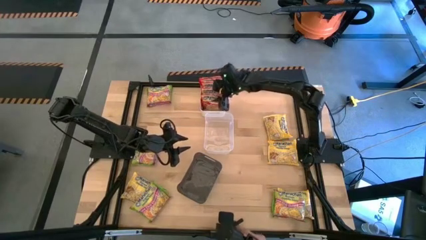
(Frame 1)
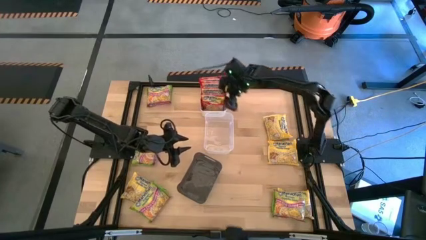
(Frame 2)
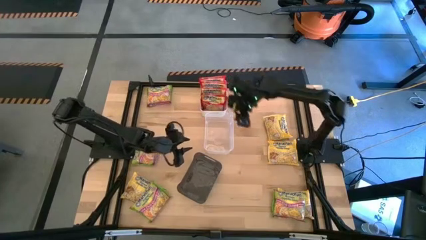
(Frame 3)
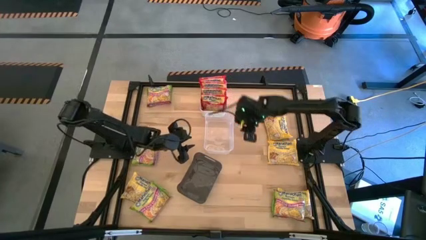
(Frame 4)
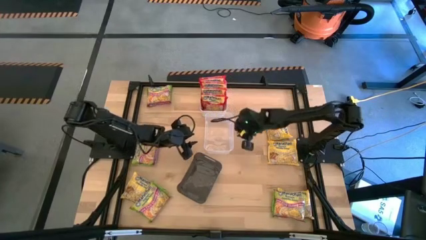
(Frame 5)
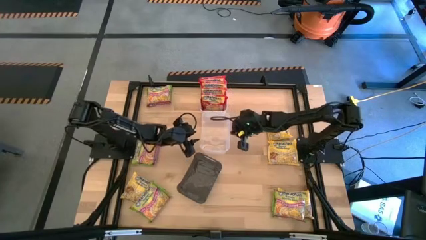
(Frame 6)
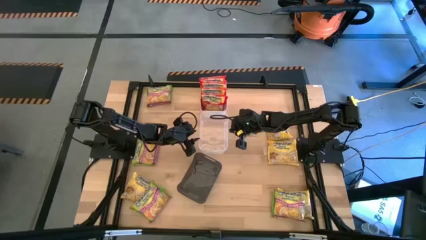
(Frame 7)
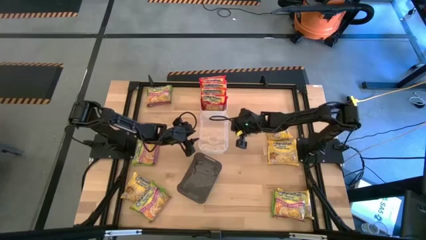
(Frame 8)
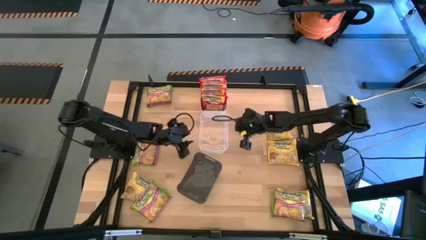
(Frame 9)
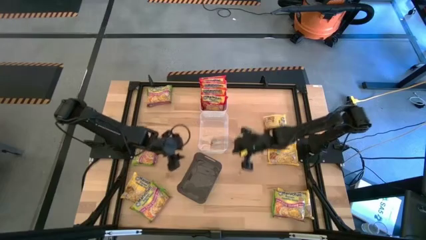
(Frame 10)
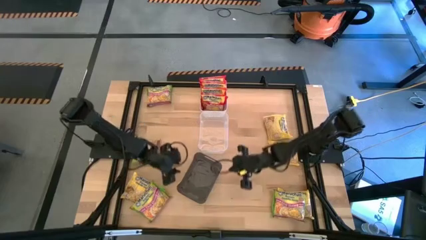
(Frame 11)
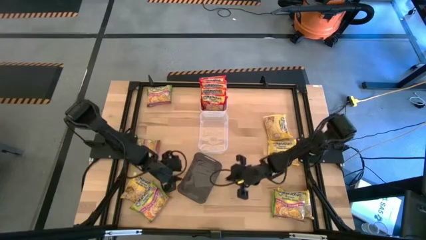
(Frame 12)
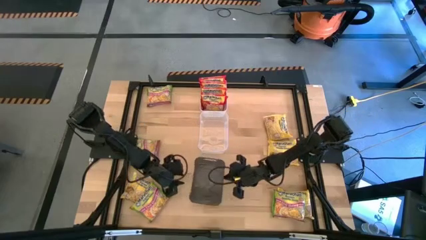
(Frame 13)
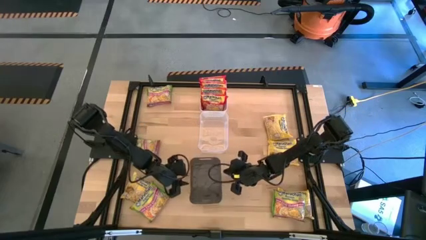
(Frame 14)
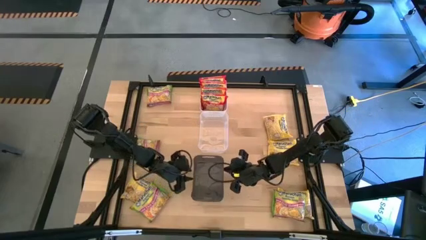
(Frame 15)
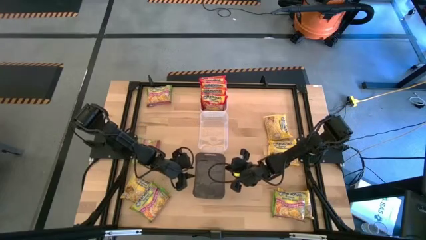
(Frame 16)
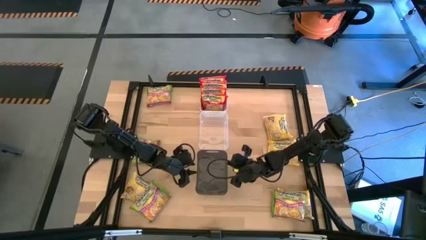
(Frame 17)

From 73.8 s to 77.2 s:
Task: Sort Maruchan noodles
Adjust the bins on the table

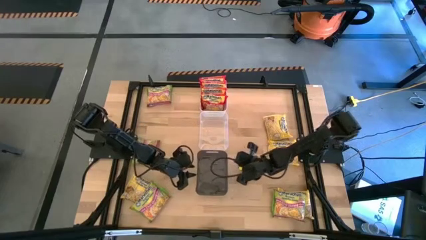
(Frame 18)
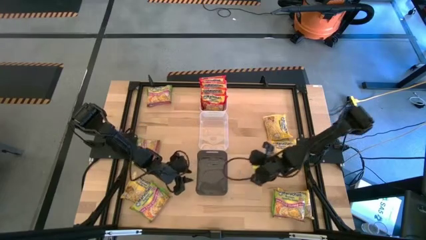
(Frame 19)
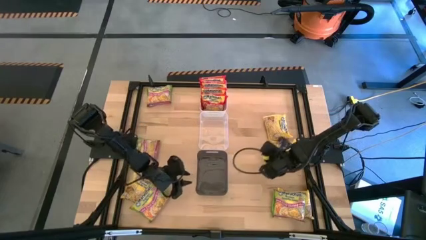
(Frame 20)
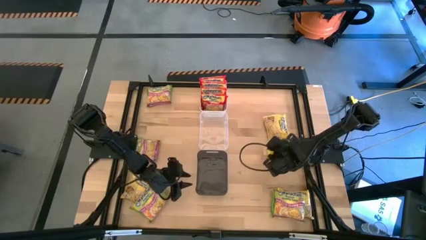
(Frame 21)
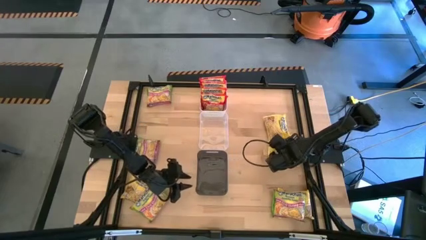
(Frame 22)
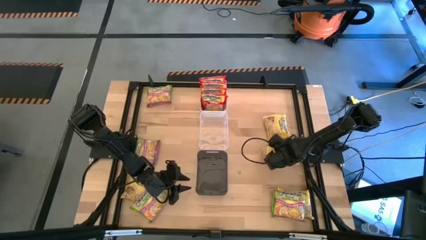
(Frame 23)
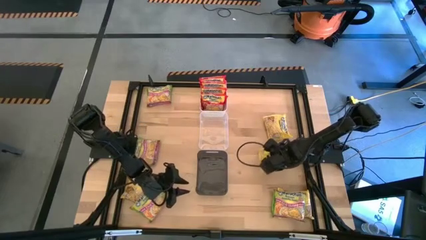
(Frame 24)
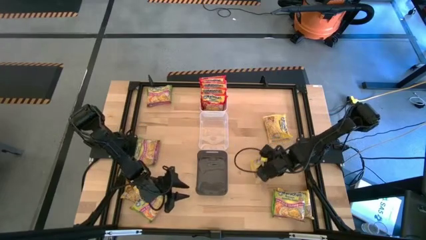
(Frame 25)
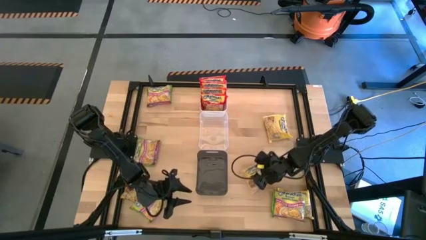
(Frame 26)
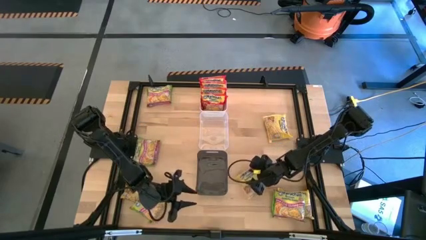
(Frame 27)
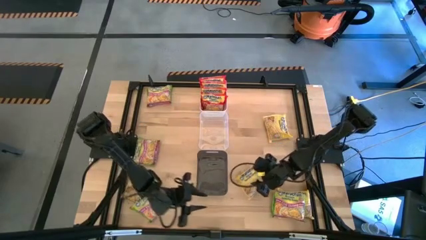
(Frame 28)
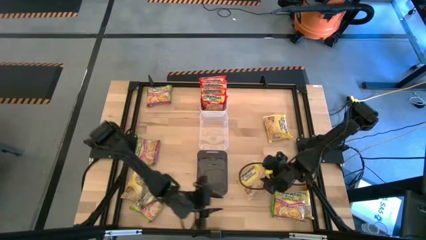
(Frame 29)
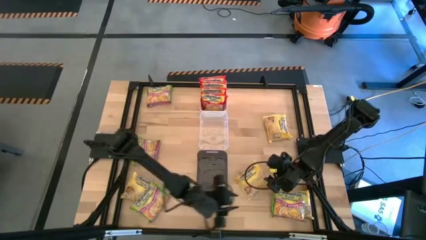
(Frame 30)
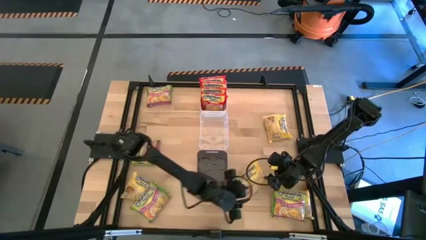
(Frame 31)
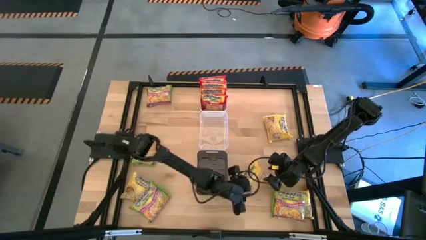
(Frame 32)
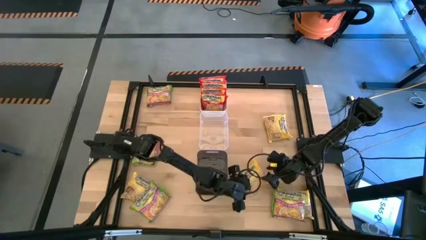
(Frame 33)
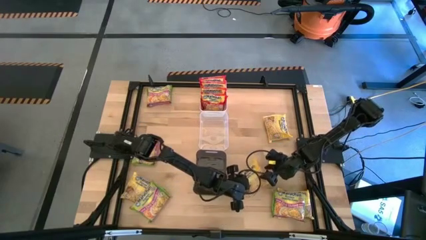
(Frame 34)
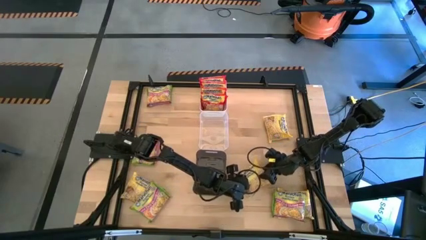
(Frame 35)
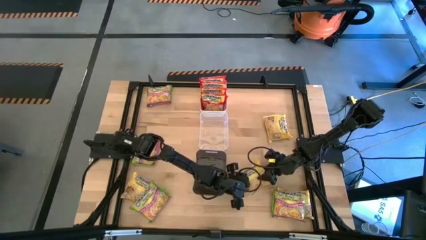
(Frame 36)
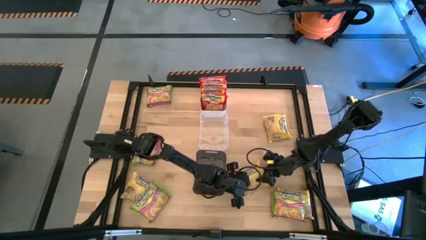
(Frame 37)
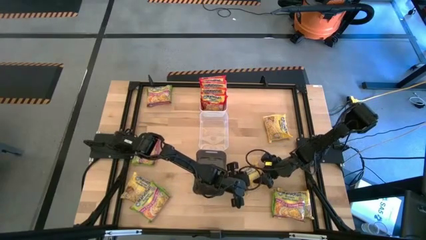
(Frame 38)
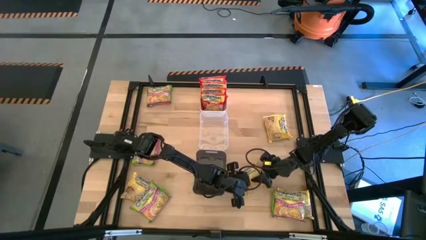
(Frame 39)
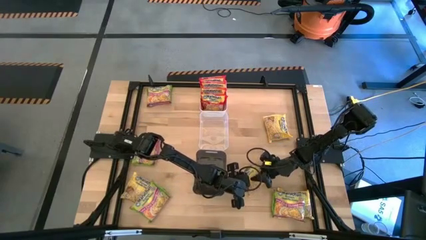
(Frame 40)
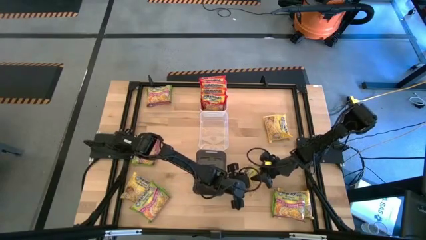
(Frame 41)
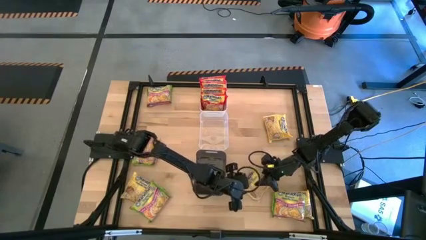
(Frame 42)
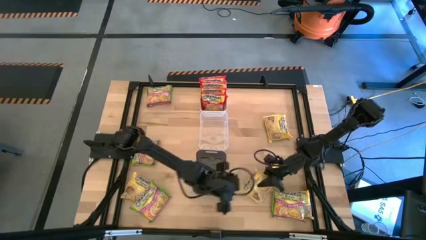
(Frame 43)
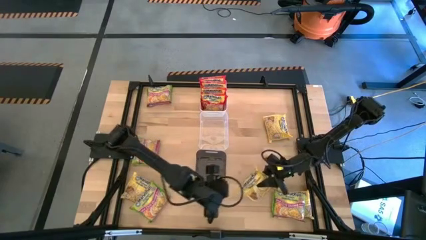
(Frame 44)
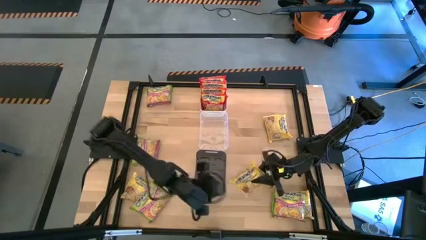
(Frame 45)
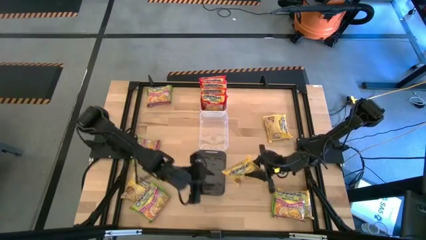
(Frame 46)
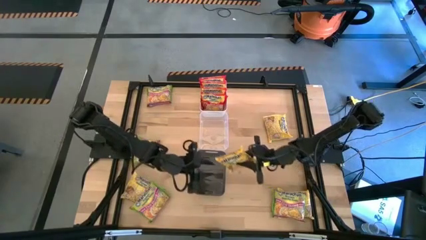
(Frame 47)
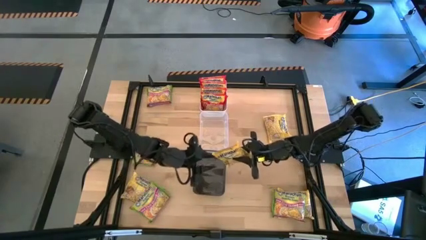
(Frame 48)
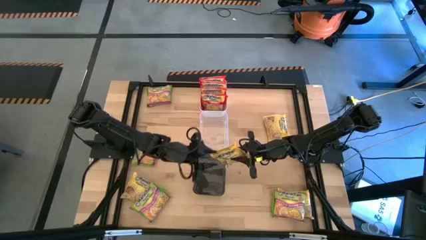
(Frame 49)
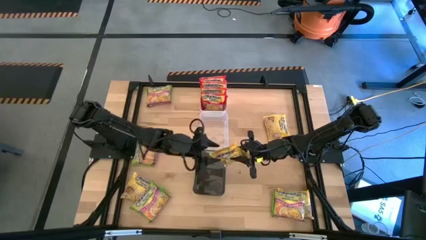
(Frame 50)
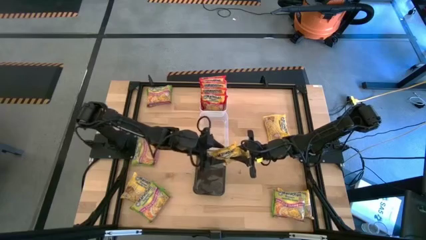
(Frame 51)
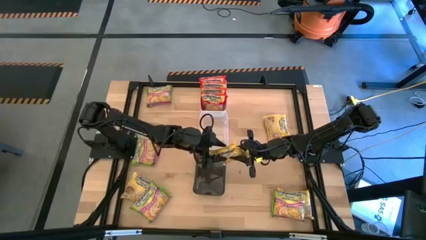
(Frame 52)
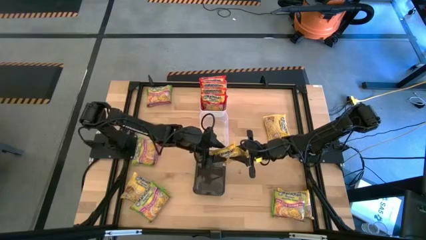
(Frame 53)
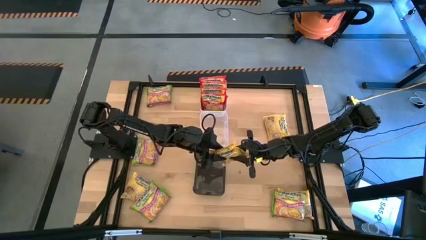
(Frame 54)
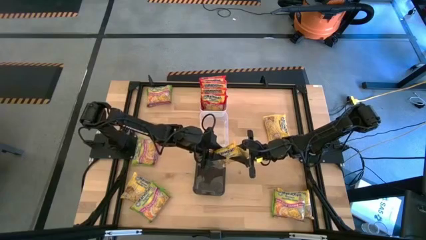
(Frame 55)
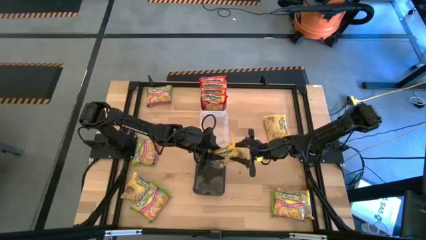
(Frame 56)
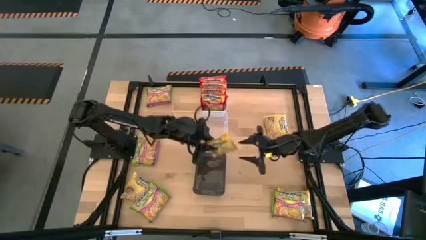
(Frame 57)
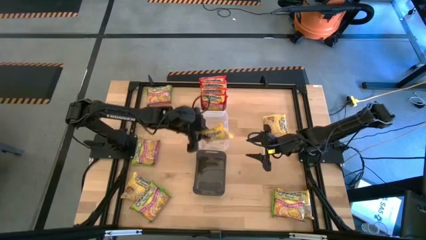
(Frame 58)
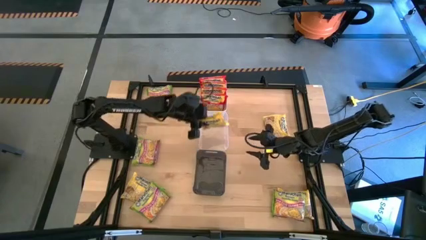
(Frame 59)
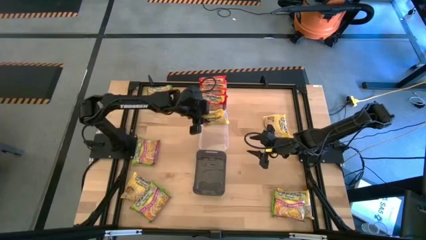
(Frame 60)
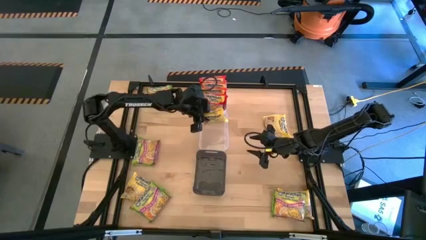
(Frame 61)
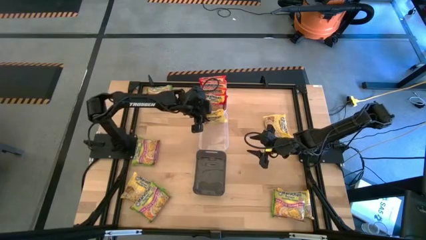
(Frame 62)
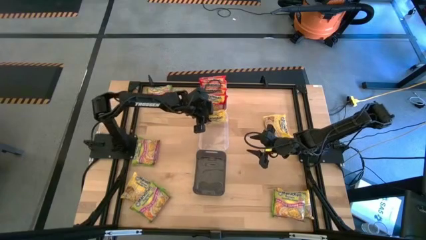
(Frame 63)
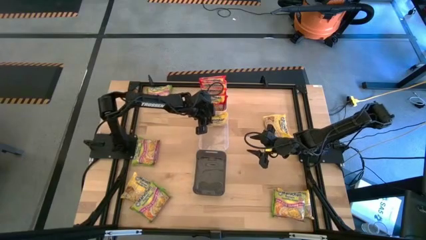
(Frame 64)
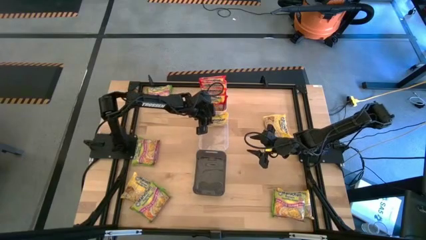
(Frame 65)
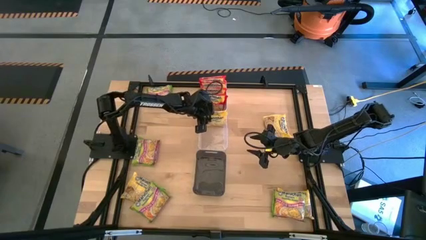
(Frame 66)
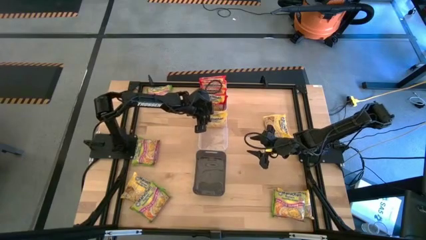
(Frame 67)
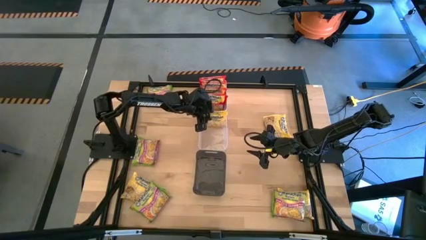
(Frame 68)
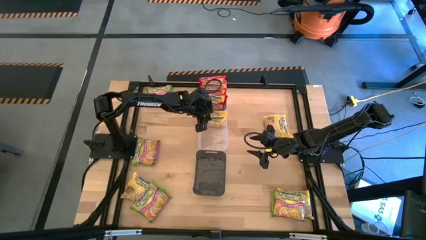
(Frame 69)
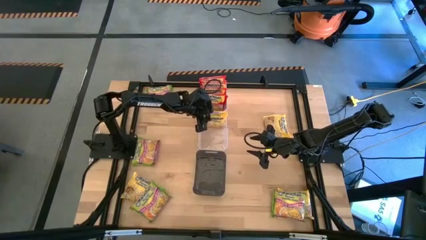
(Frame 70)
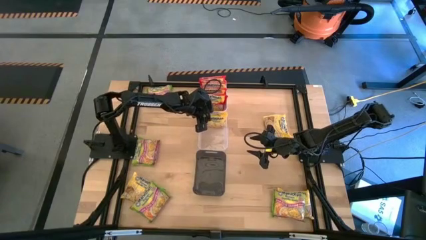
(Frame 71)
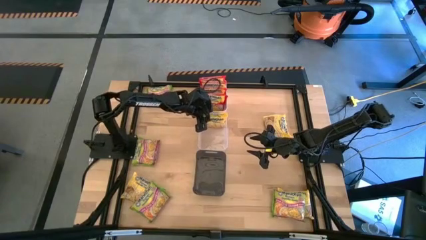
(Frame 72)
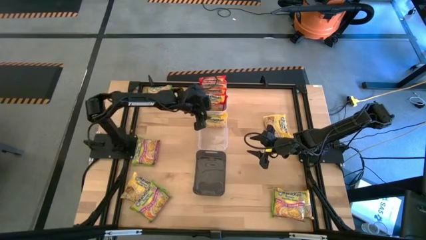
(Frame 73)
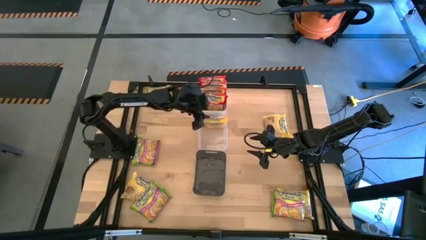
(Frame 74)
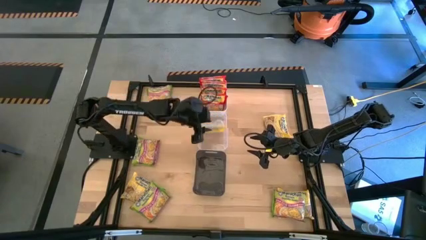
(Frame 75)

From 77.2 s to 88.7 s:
Put the yellow noodle pack into the transparent bin
